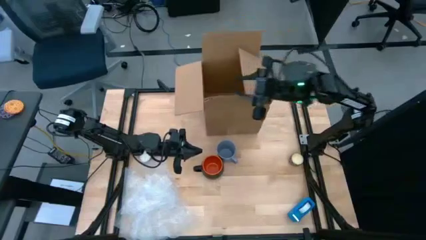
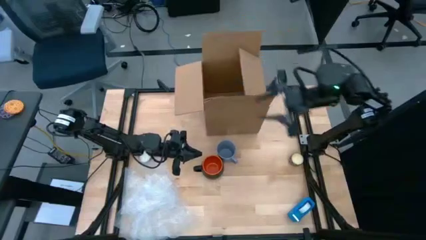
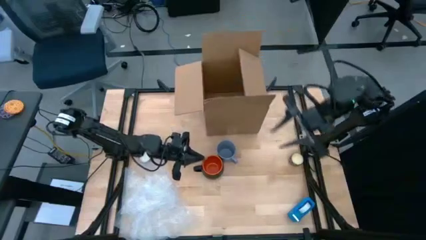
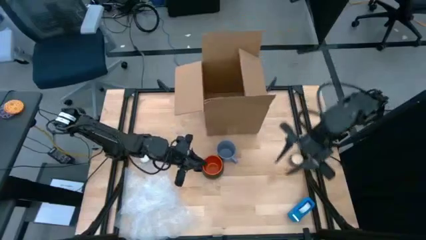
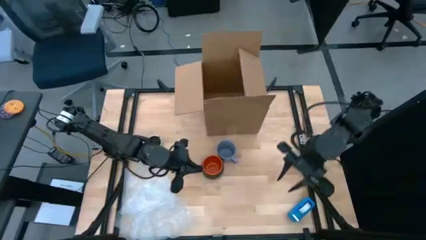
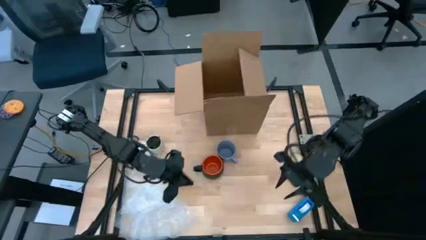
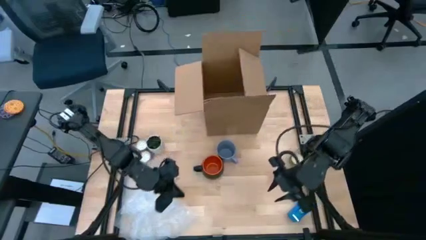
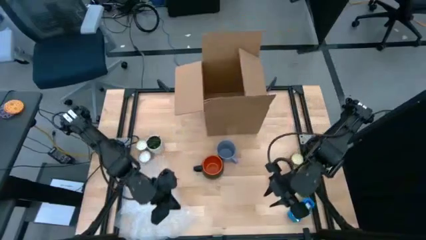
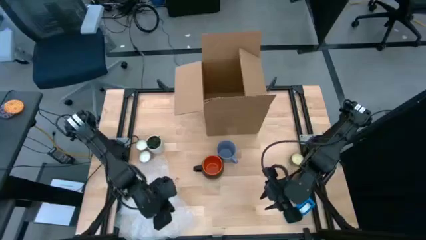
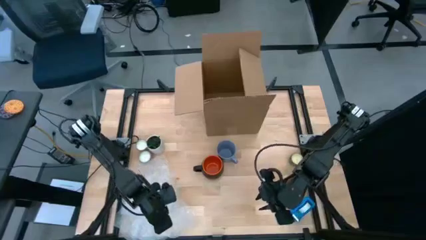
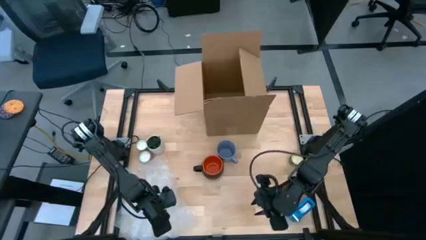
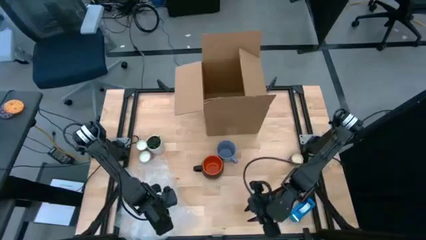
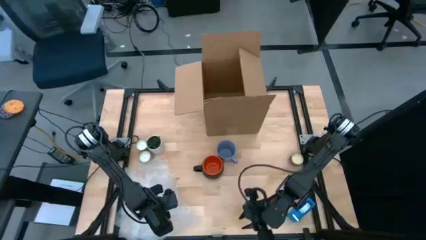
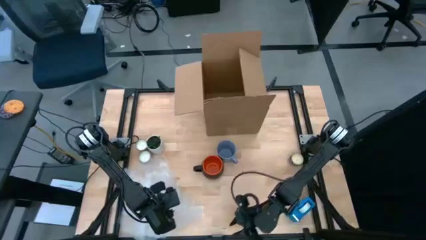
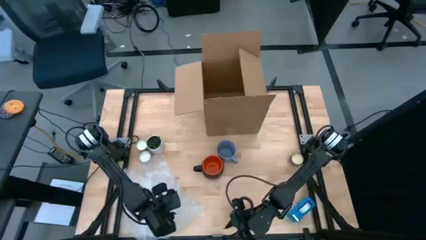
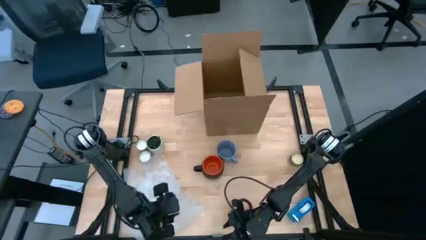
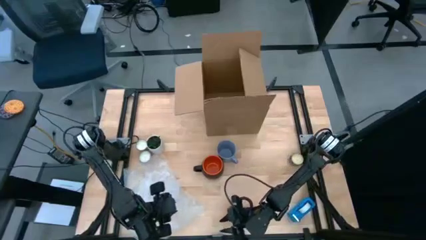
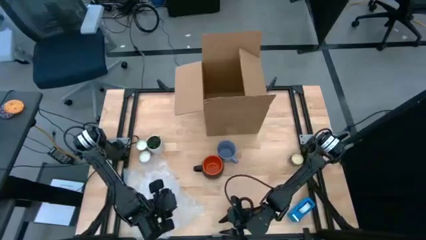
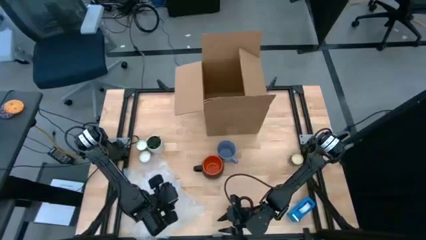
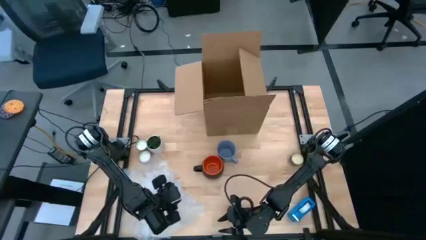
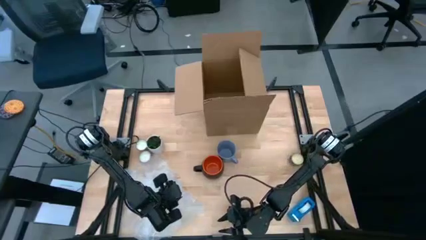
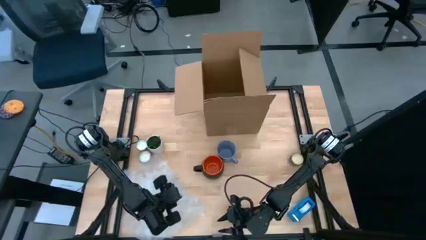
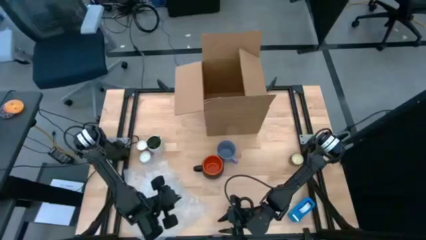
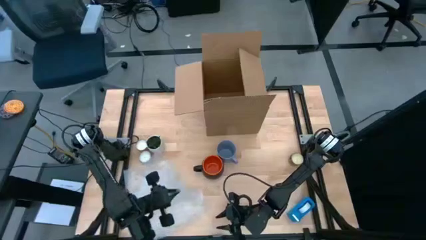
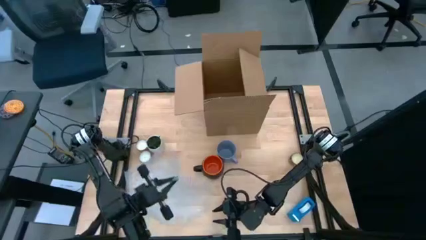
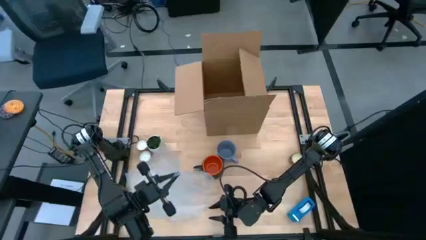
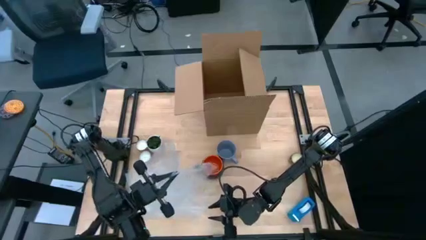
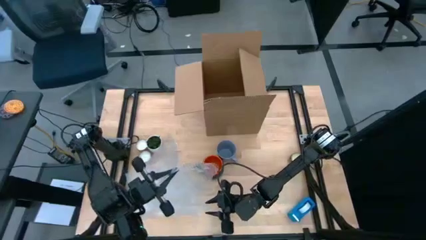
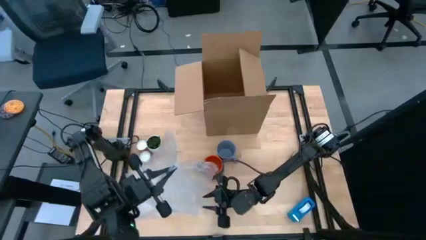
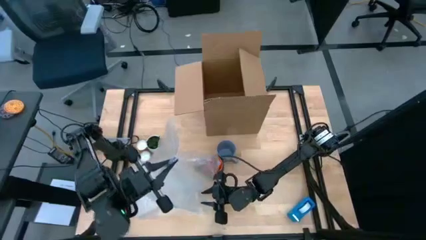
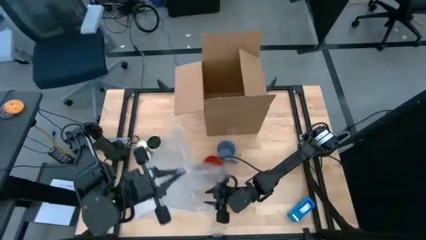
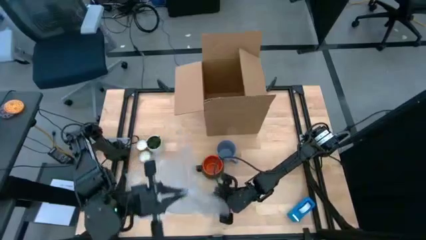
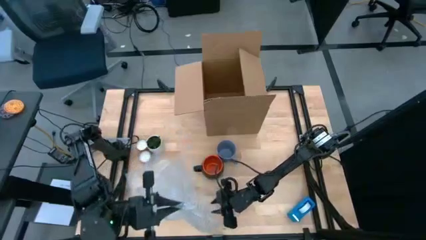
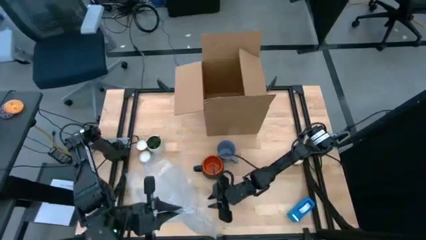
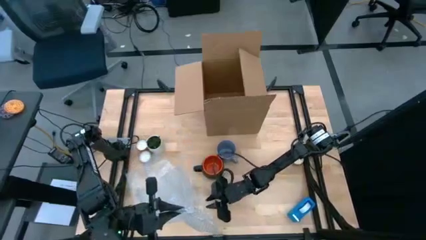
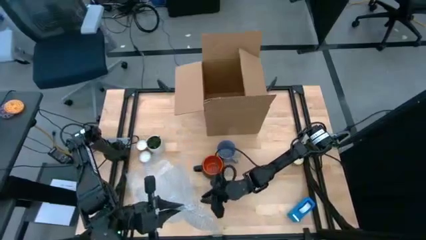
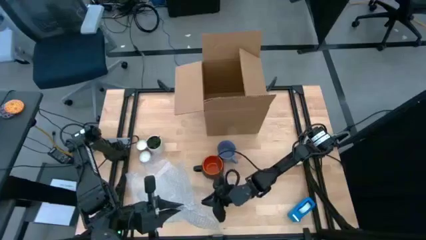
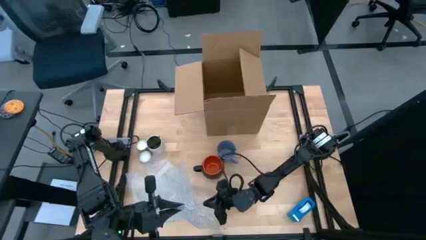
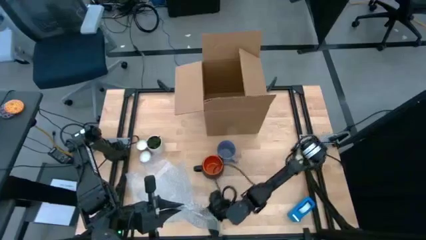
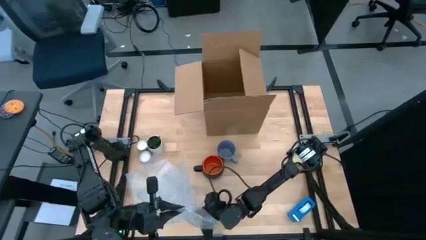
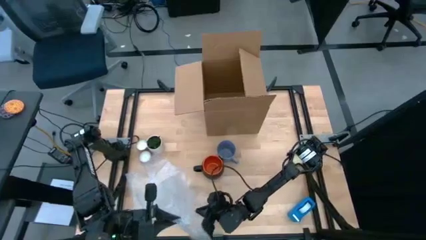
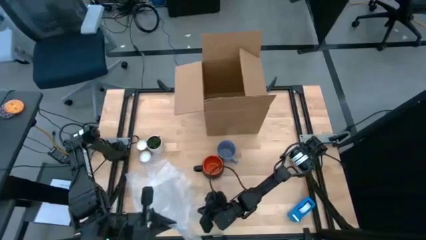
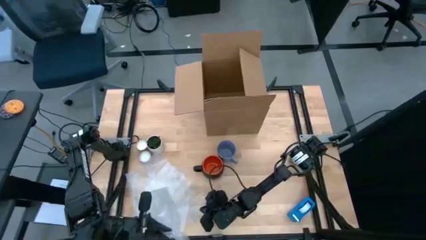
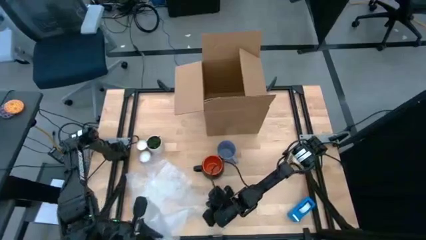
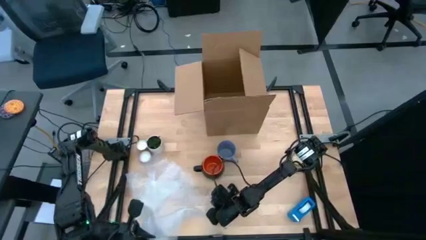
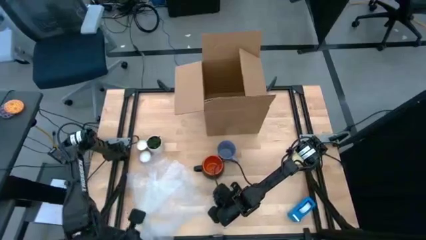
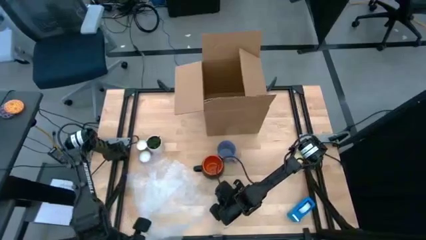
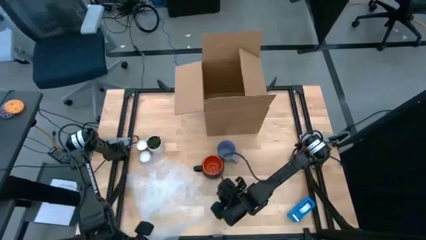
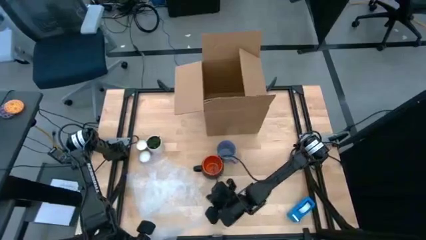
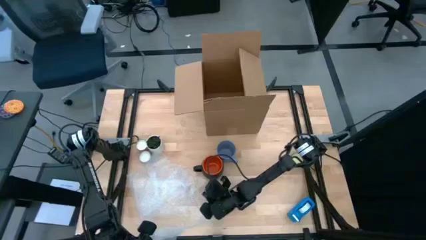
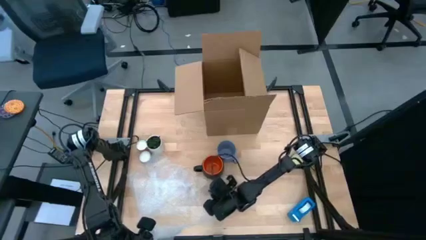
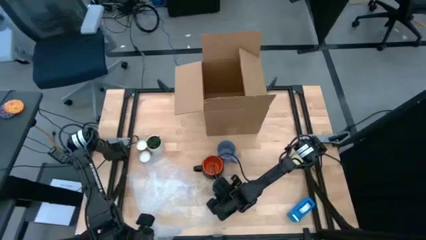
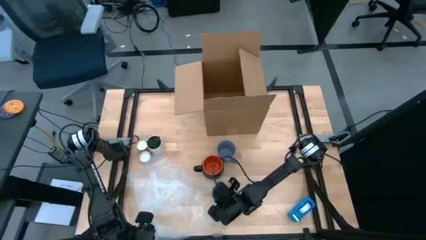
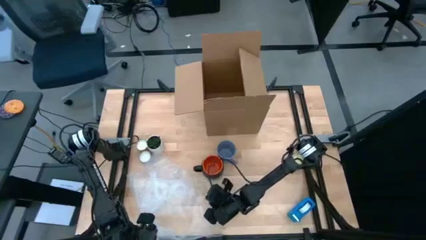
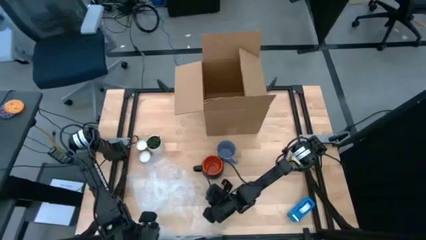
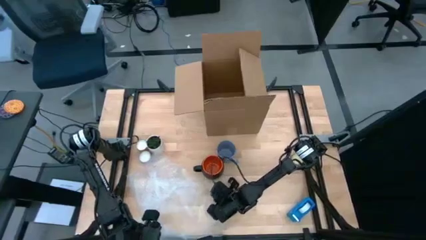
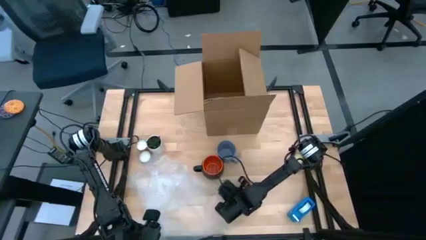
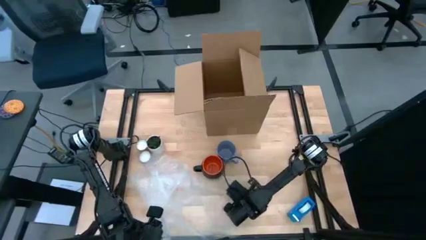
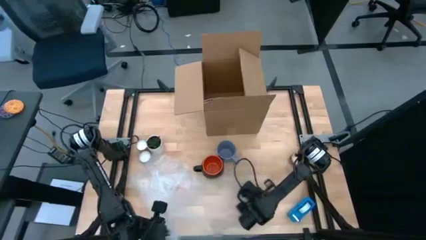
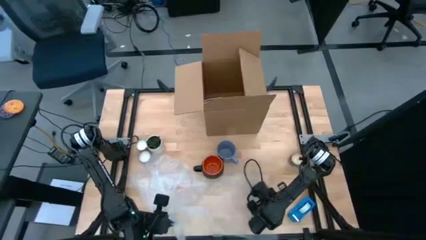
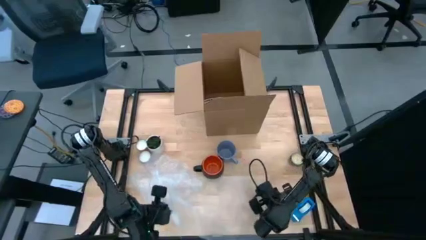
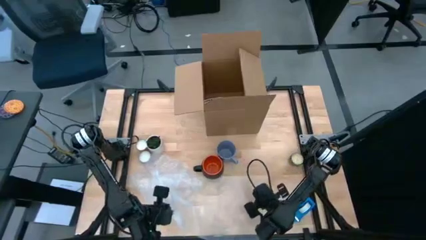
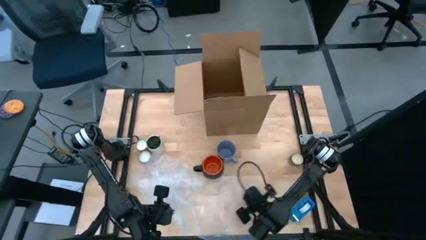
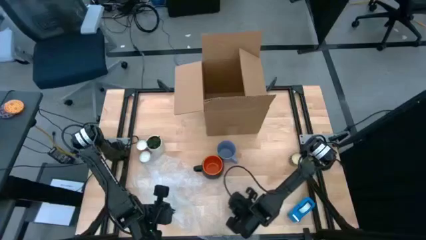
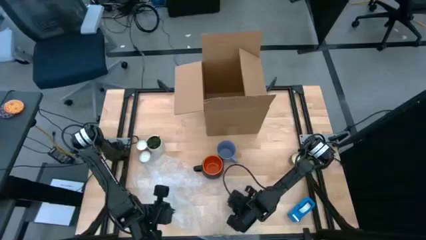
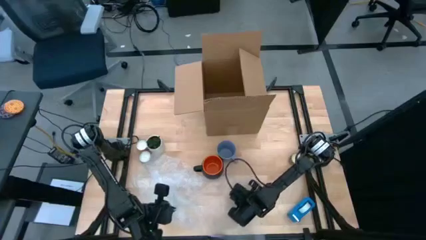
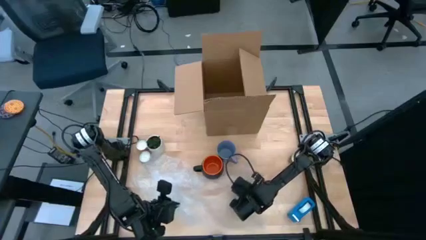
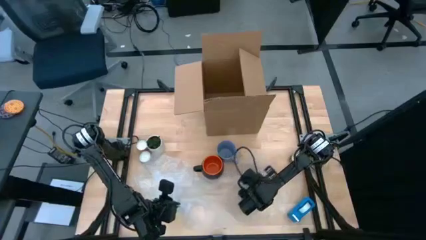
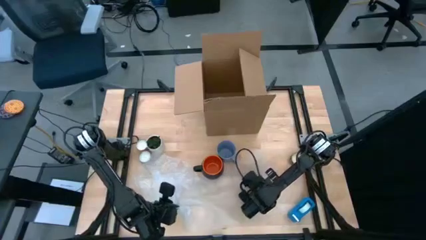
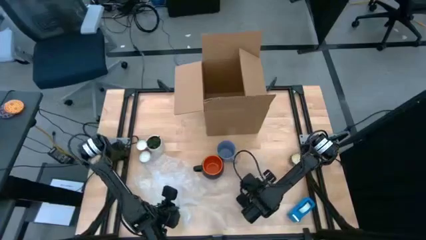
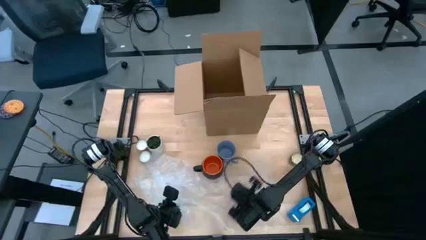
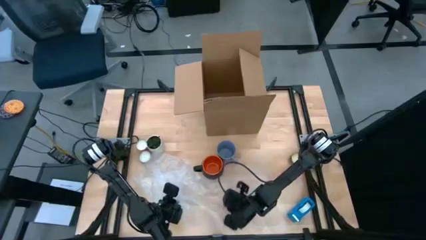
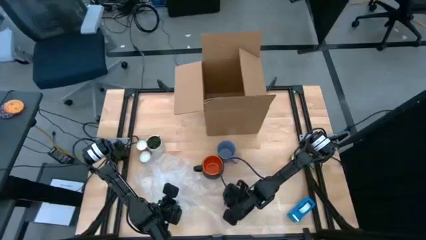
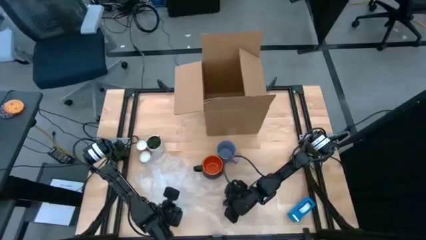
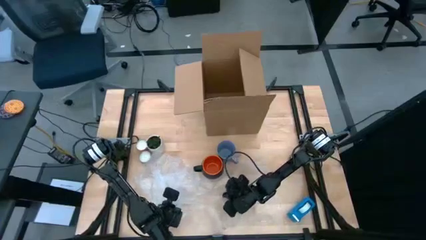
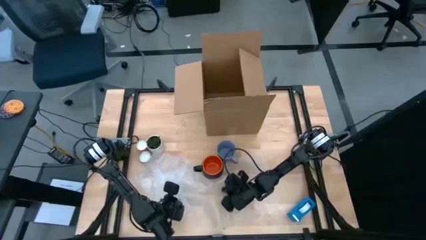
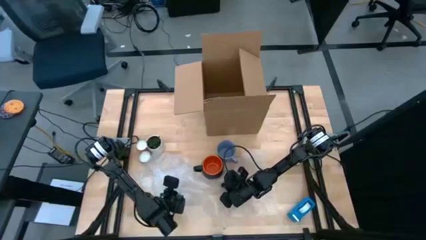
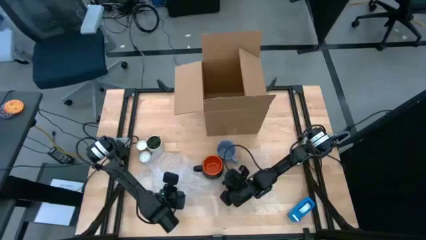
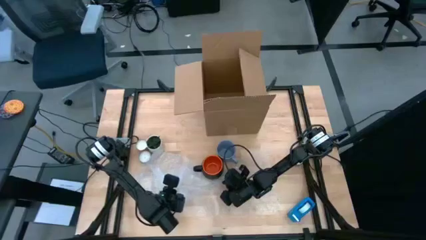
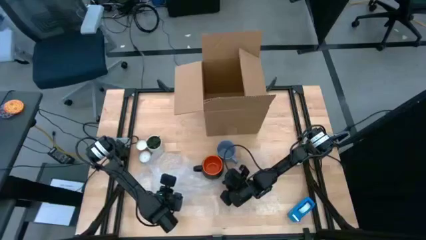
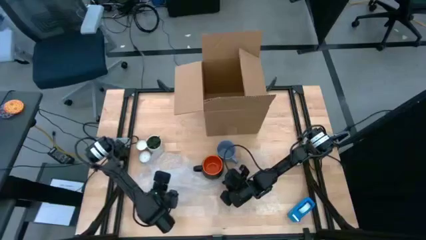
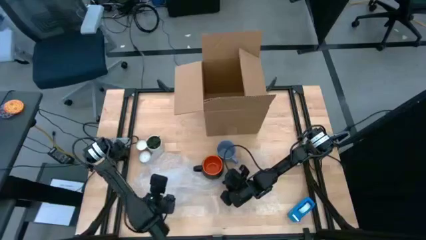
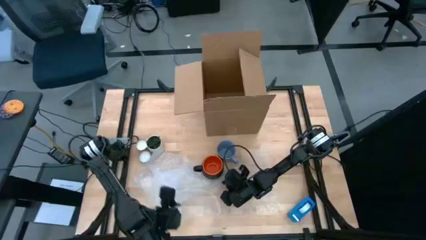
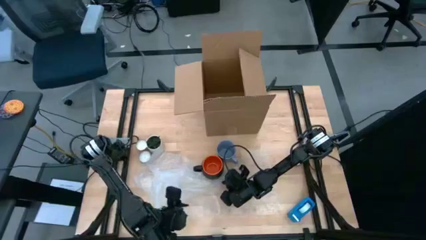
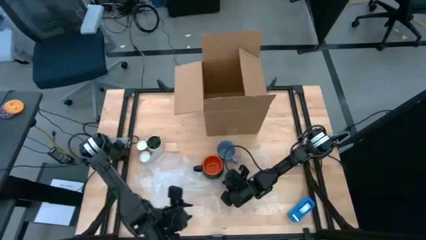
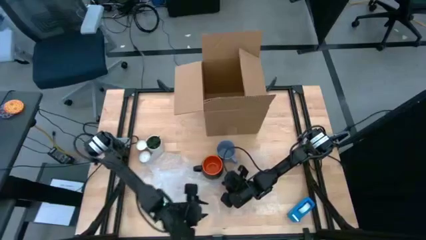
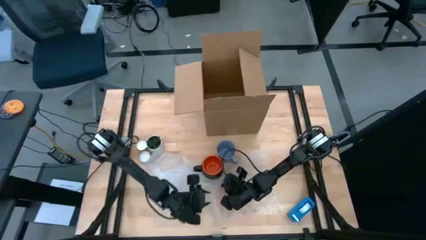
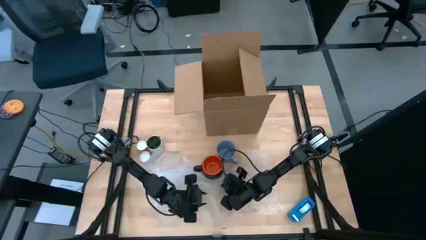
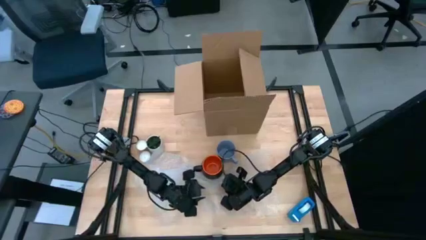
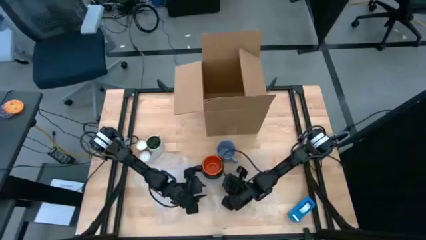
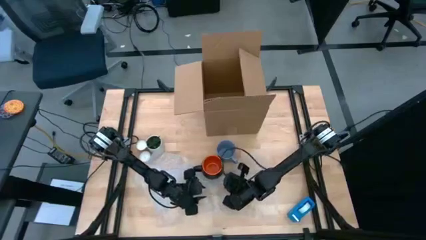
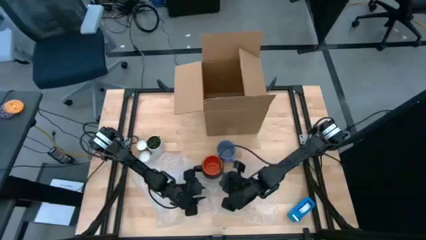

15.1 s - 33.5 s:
Task: wrap mug
Wrap the black mug with the top bubble wrap
